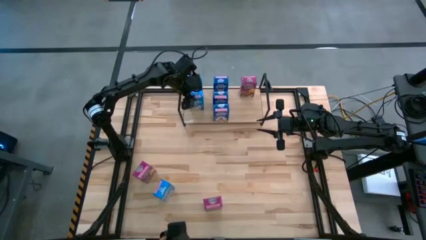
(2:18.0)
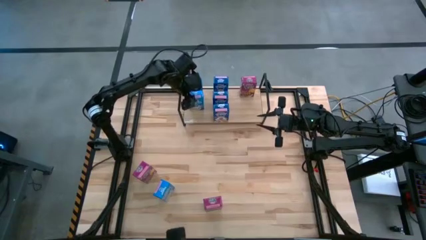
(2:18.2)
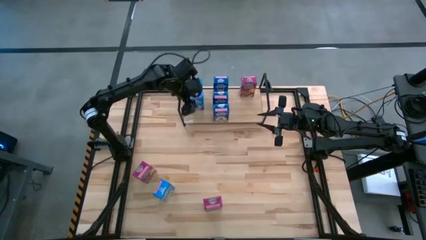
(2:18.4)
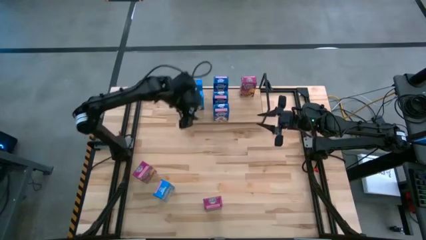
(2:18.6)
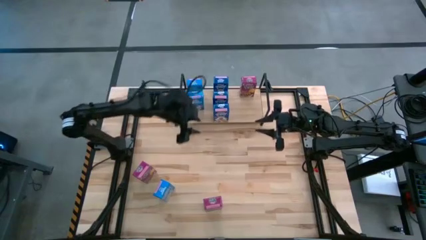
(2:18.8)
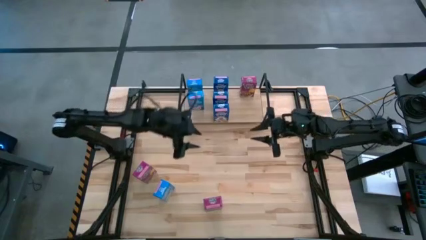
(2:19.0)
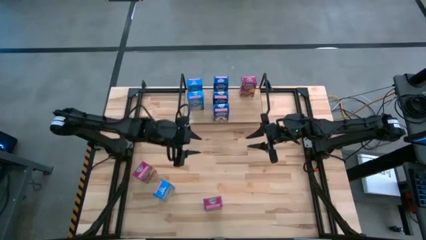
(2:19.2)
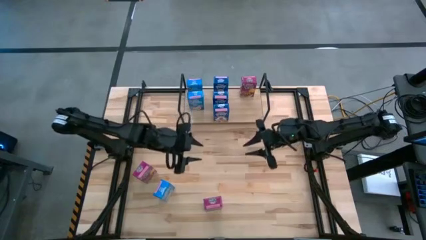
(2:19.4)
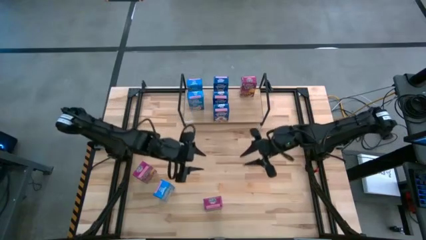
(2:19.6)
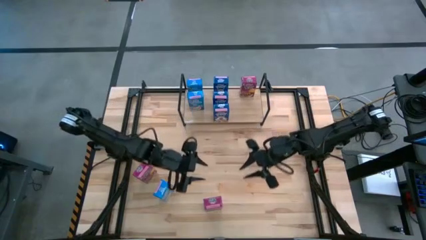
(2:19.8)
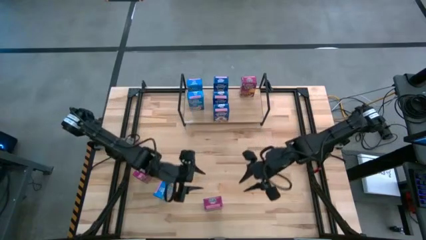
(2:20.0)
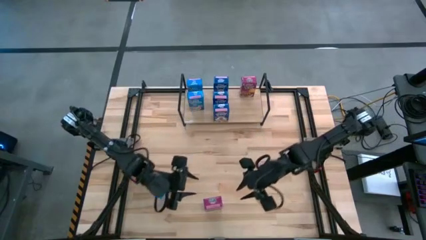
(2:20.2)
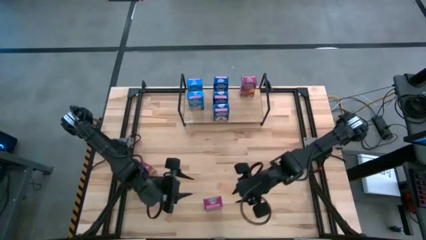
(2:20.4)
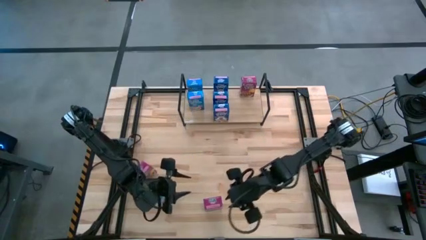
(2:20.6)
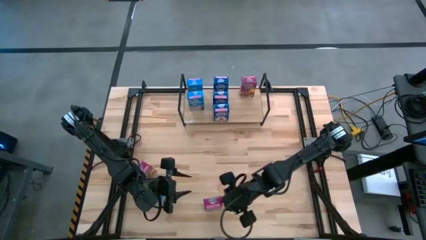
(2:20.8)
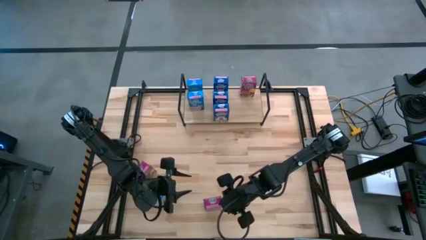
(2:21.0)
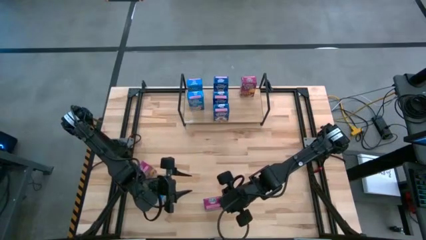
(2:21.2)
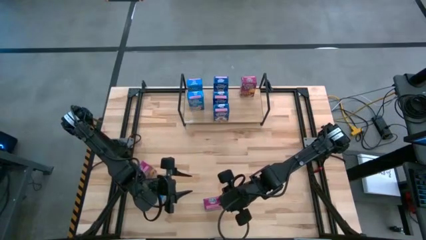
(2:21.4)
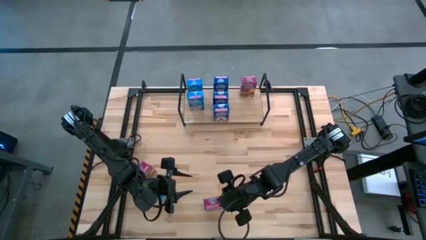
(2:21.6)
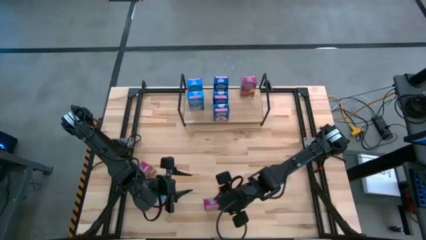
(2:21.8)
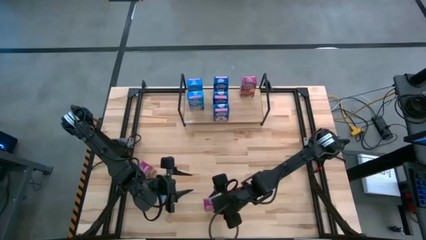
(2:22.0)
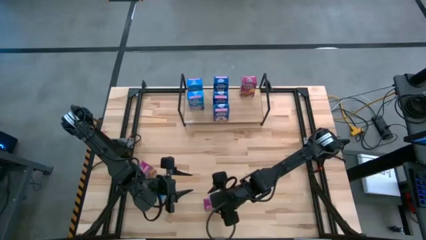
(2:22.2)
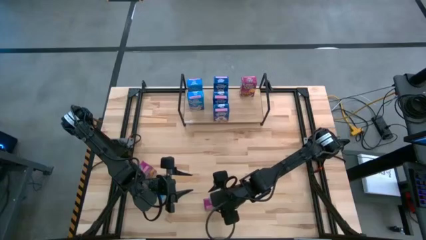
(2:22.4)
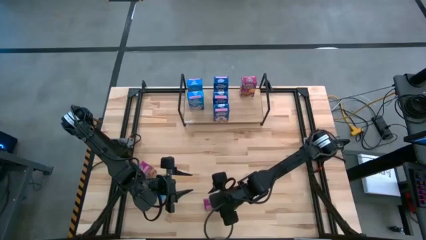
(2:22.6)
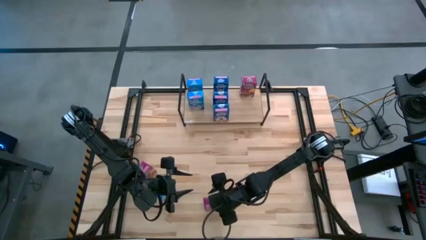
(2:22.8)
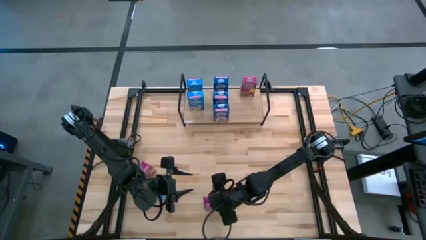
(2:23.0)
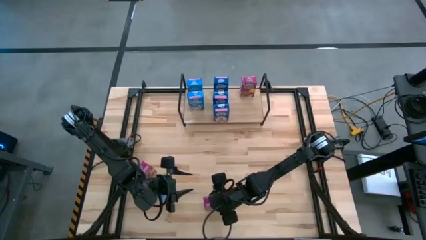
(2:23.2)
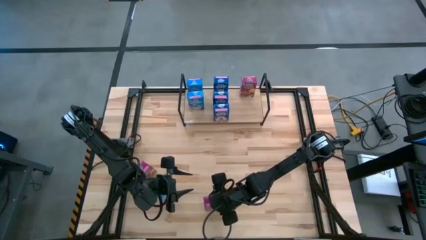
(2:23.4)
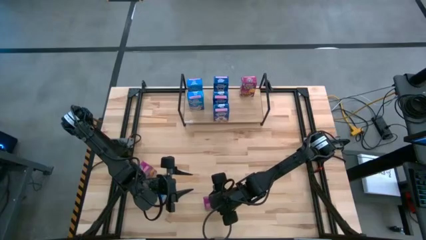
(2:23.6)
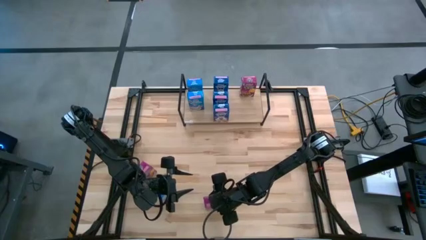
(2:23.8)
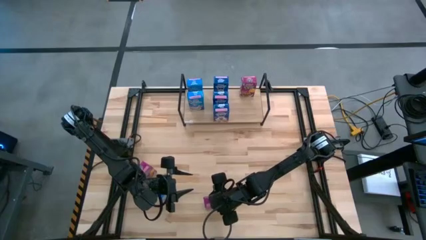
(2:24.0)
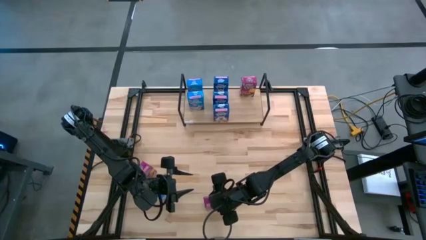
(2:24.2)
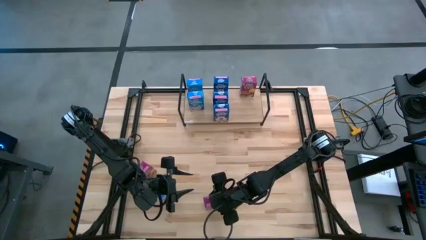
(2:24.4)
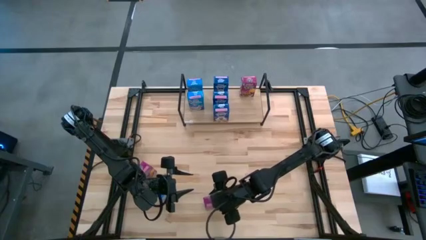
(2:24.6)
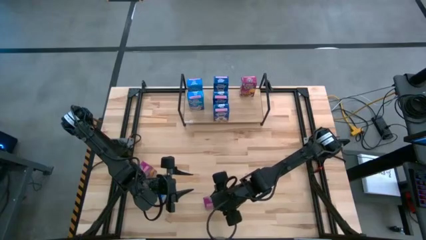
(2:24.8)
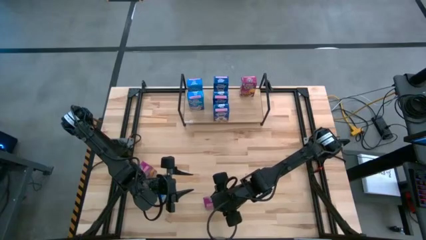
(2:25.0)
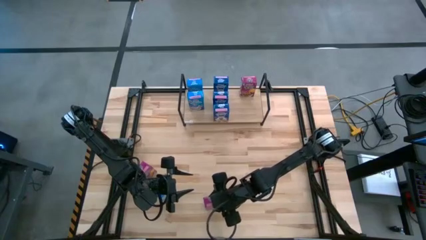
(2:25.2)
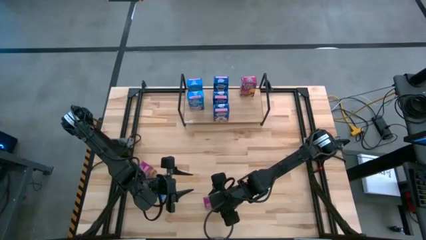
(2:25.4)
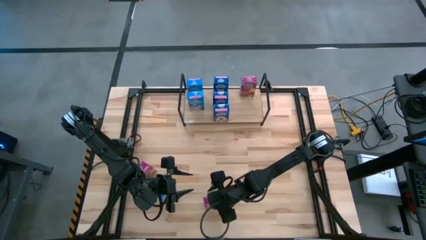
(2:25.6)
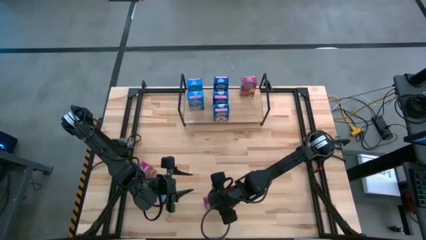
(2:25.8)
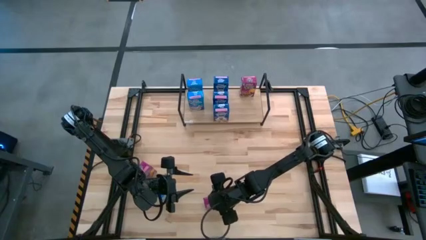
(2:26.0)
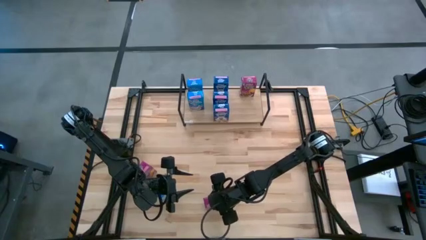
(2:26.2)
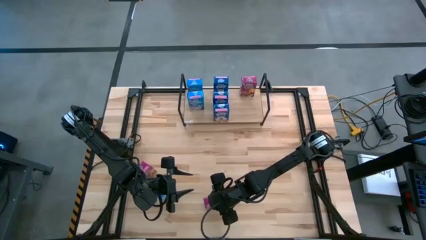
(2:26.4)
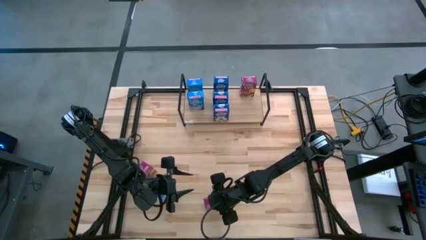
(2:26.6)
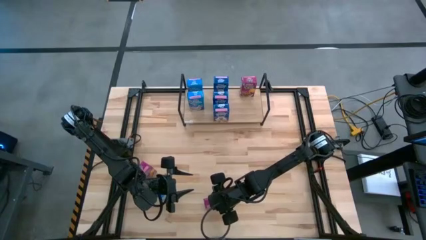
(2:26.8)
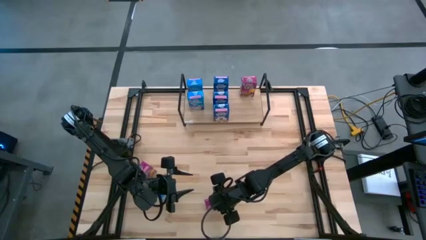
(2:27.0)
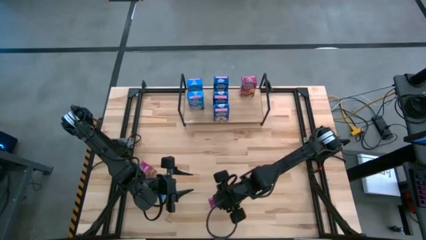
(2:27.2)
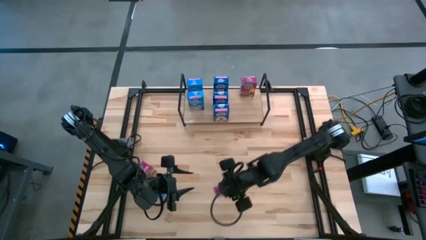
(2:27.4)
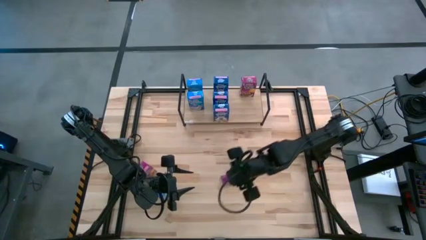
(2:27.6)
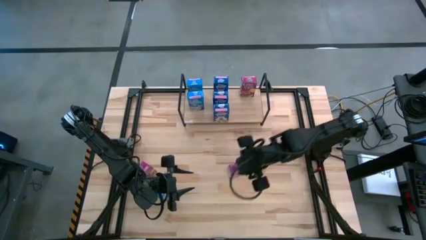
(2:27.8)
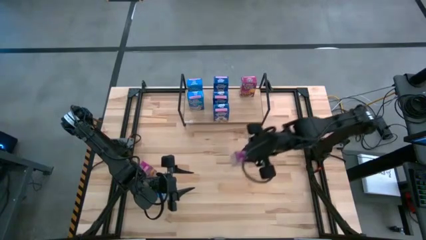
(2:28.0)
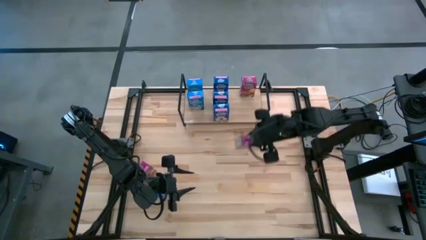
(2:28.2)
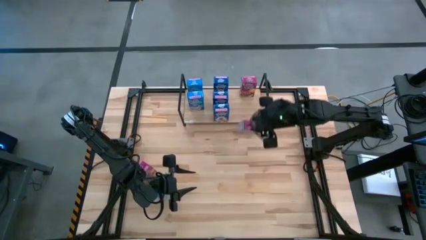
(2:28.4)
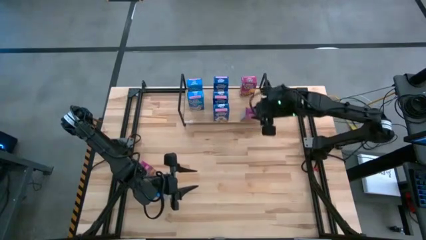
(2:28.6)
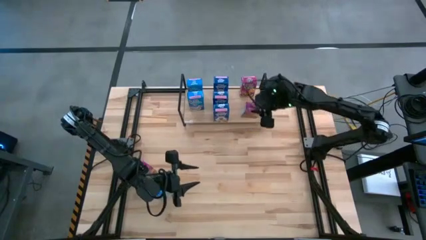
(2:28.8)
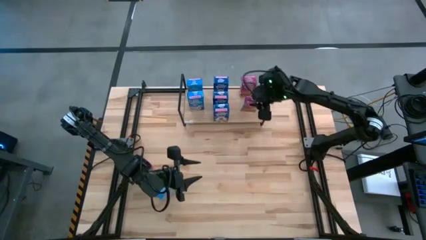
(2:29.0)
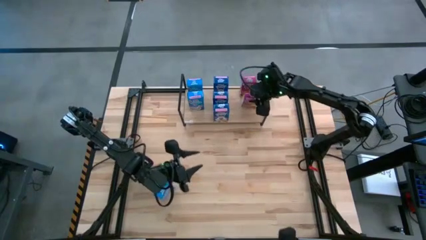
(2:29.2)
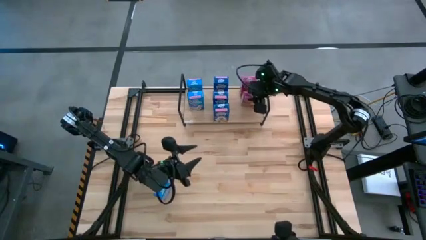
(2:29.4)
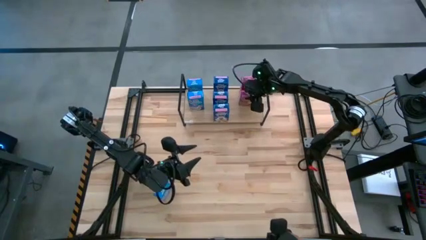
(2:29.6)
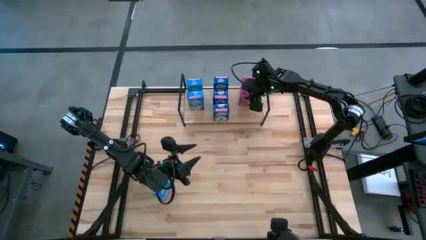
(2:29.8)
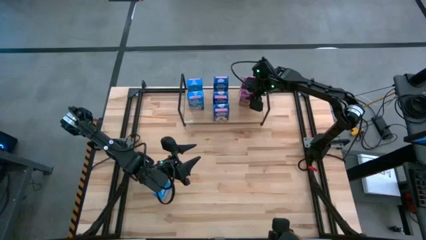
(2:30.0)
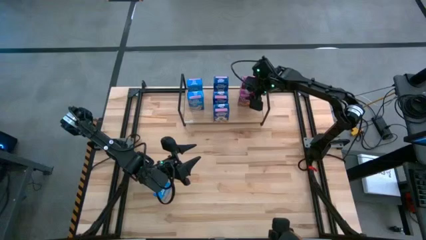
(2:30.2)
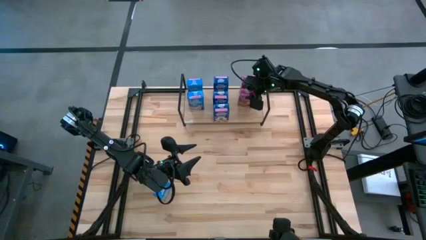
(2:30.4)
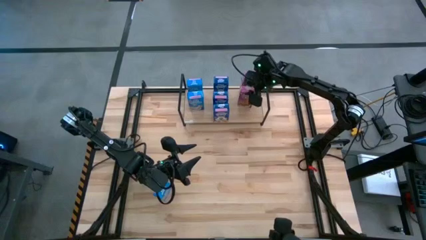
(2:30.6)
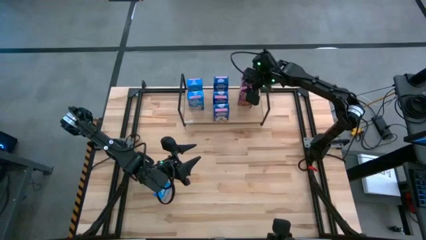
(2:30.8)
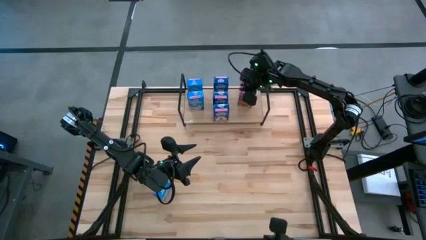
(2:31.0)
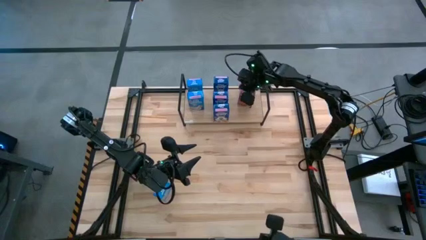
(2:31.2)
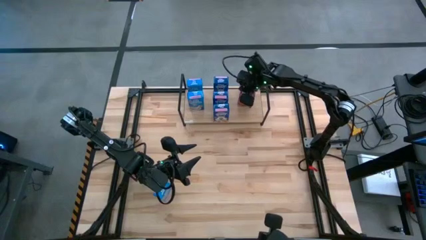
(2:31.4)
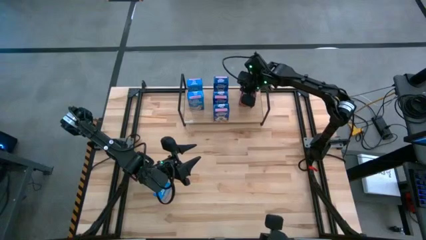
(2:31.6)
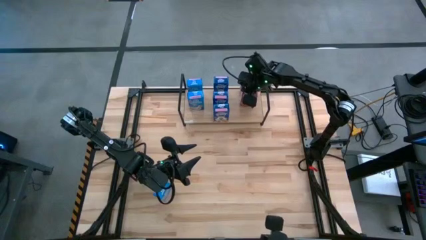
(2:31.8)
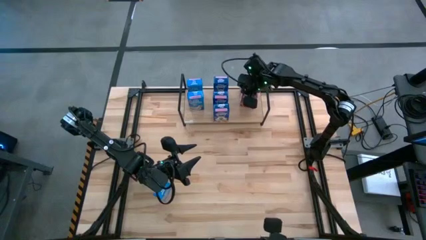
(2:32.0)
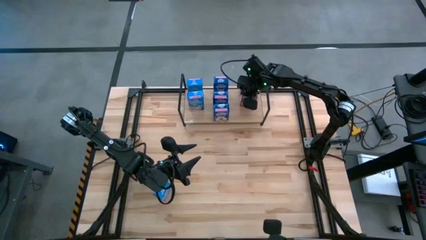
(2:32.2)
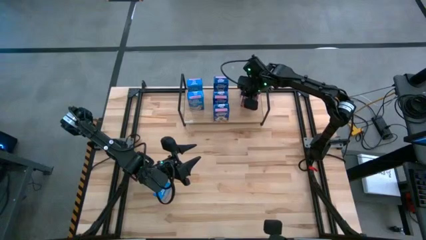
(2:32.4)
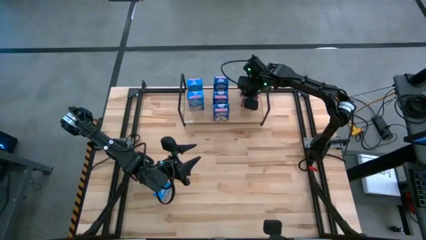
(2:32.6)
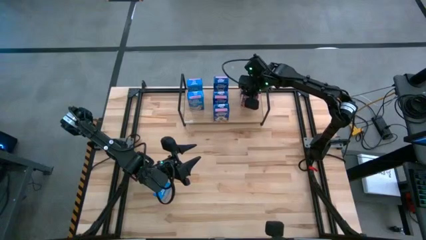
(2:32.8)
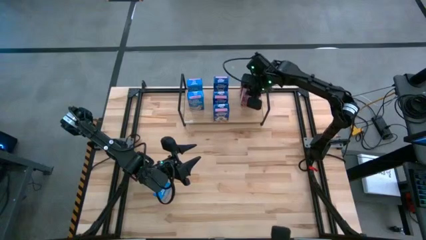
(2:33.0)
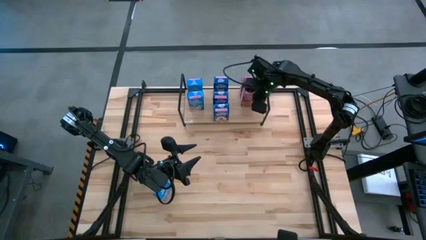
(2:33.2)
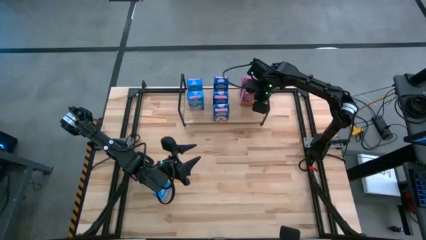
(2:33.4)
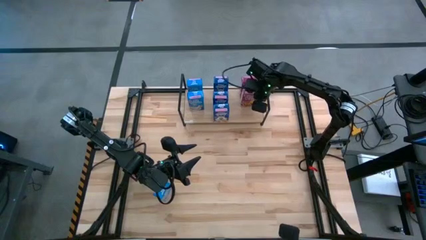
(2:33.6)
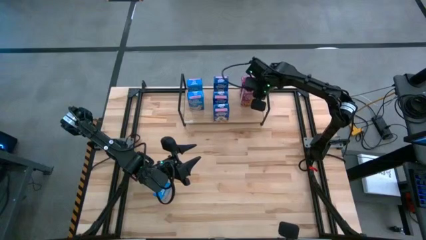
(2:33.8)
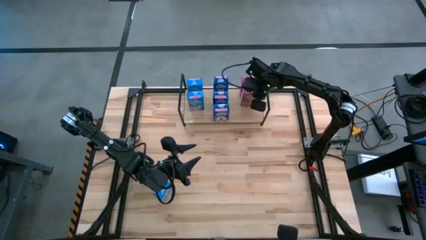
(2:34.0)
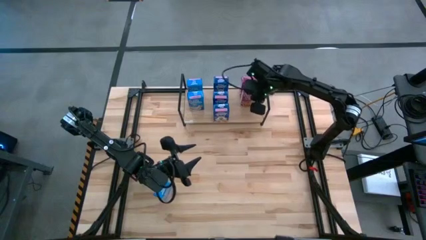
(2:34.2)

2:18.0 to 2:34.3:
Task: Stack cereal on shelf
Put the bottom purple cereal box on the shelf aligned with the other purple cereal box

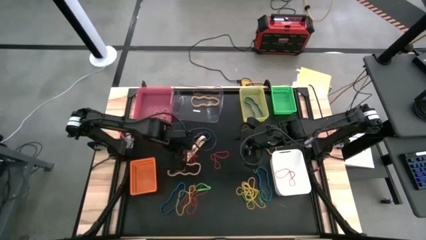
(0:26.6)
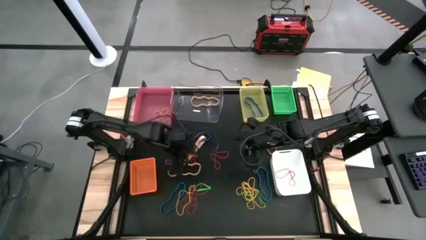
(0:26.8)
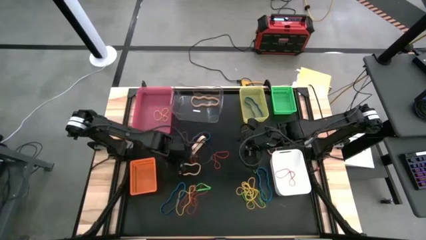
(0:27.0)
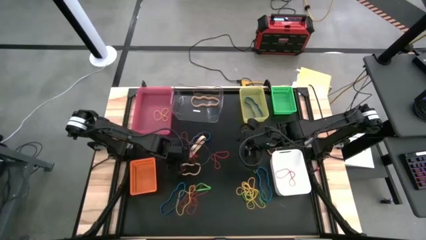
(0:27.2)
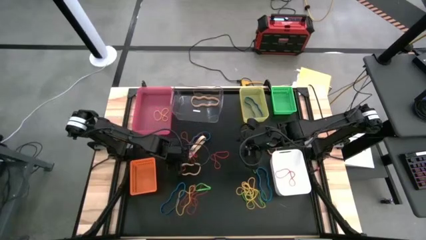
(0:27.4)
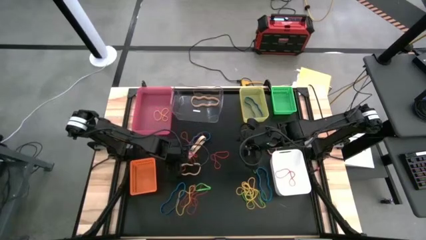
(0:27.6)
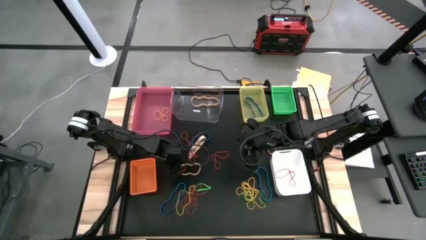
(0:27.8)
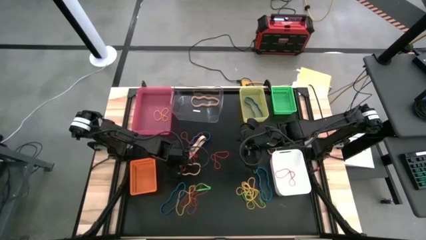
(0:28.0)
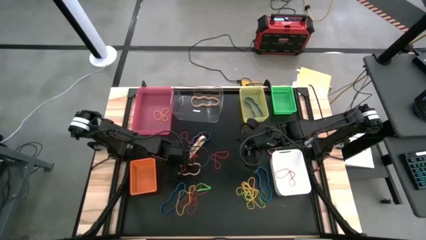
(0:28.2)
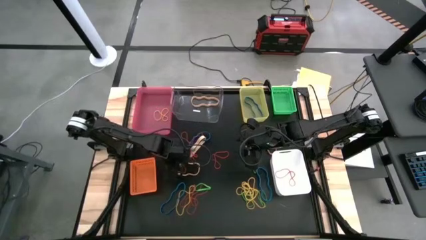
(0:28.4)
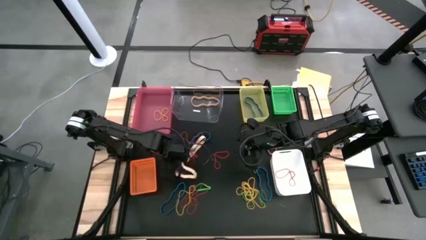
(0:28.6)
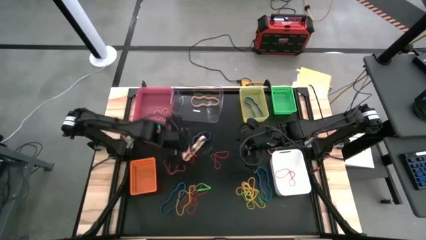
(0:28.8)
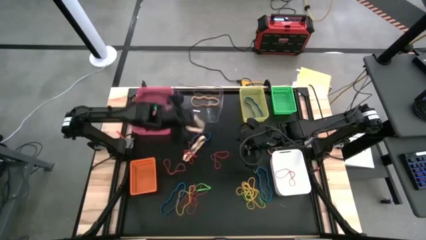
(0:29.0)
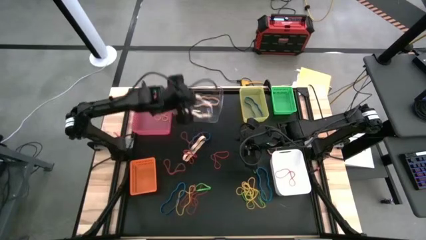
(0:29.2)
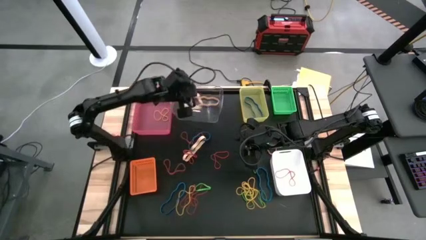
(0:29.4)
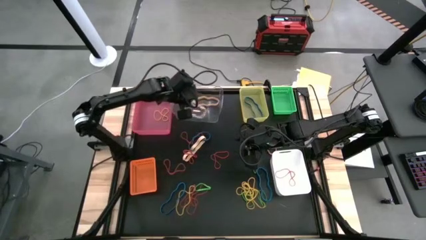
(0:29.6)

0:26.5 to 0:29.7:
Task: Sort rubber bands into baskets
Put the brown rubber band into the transparent bin
